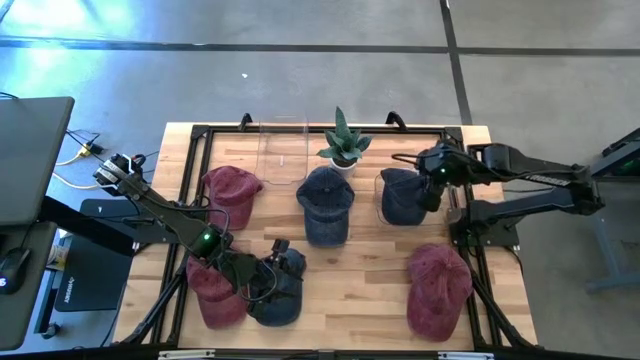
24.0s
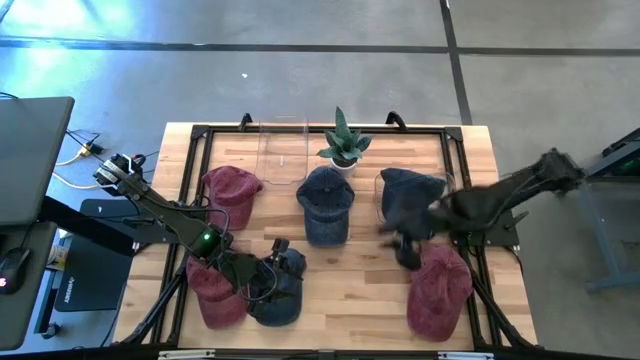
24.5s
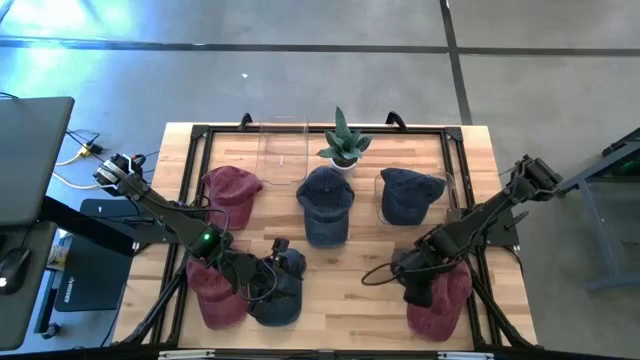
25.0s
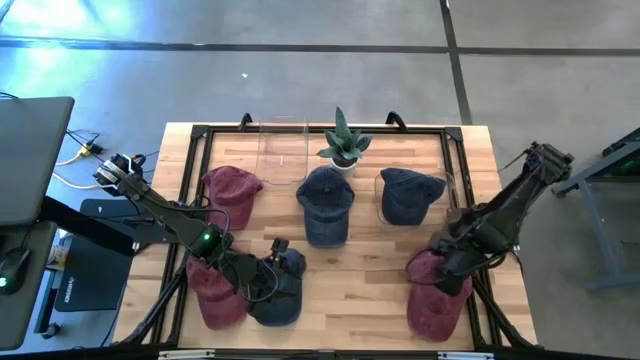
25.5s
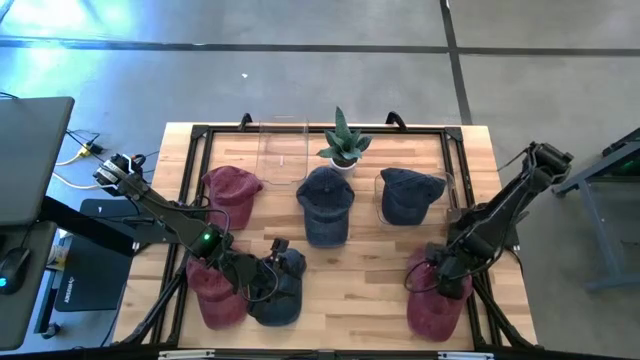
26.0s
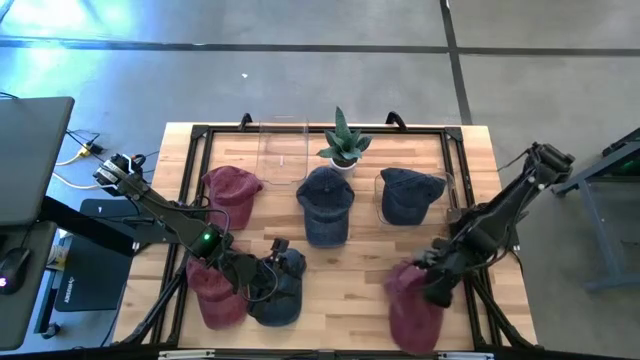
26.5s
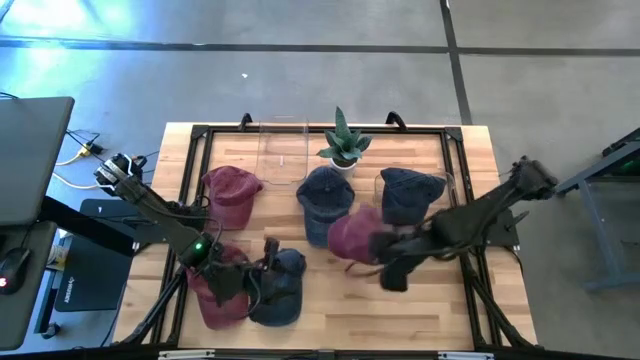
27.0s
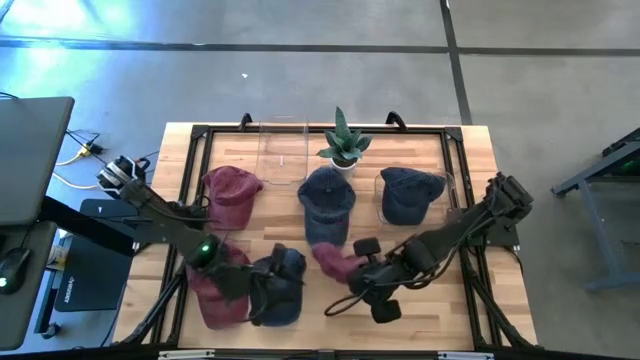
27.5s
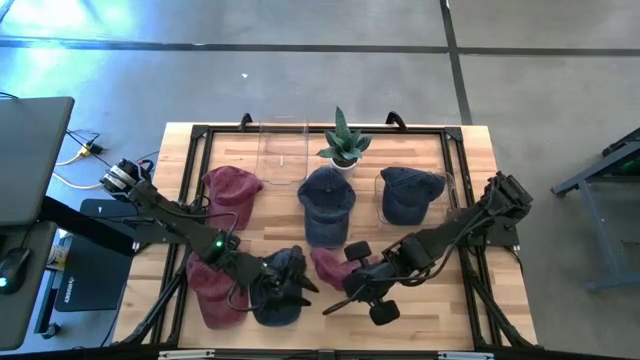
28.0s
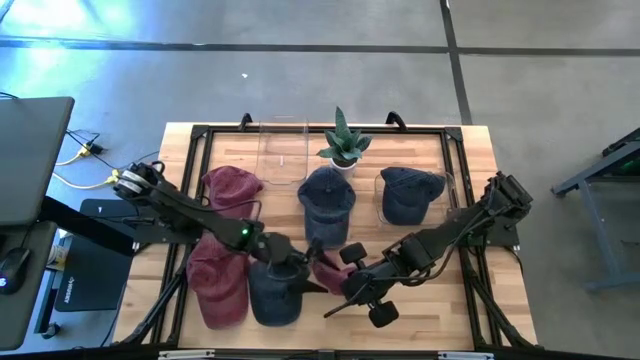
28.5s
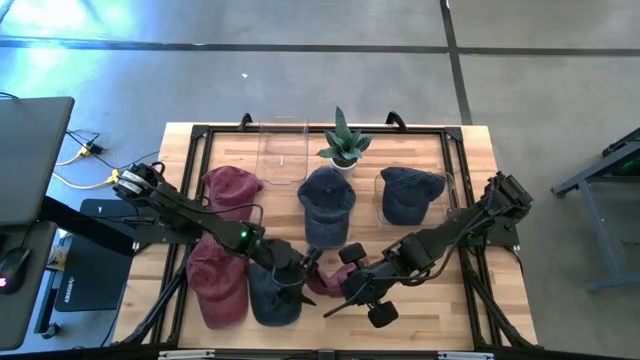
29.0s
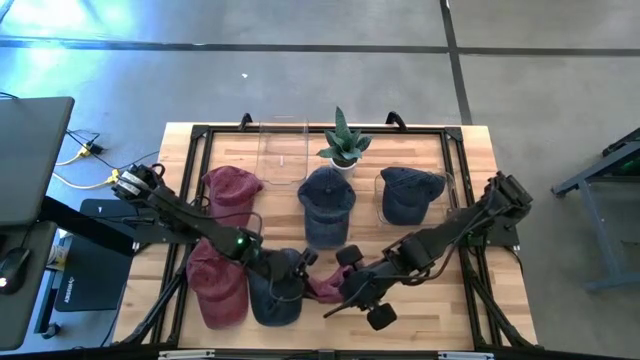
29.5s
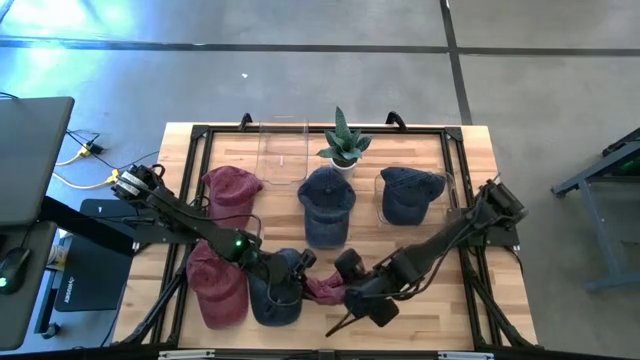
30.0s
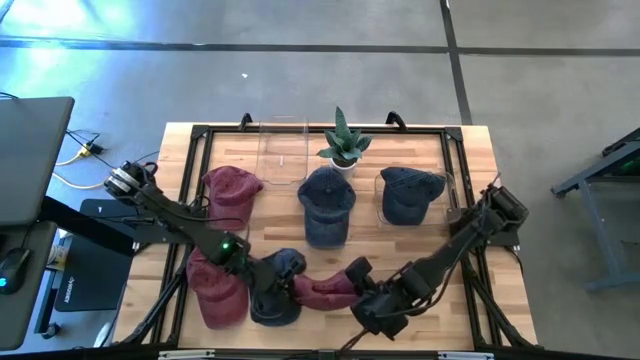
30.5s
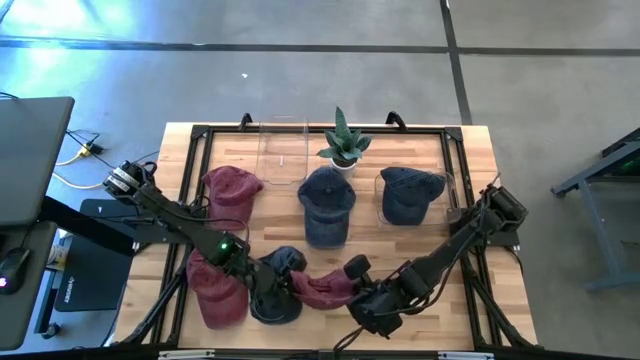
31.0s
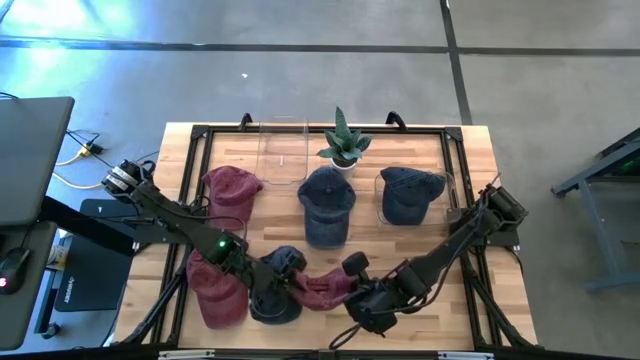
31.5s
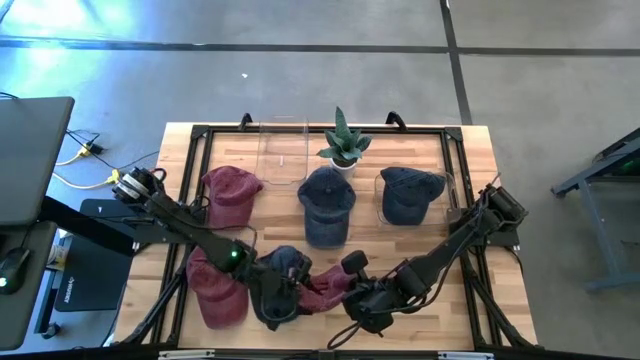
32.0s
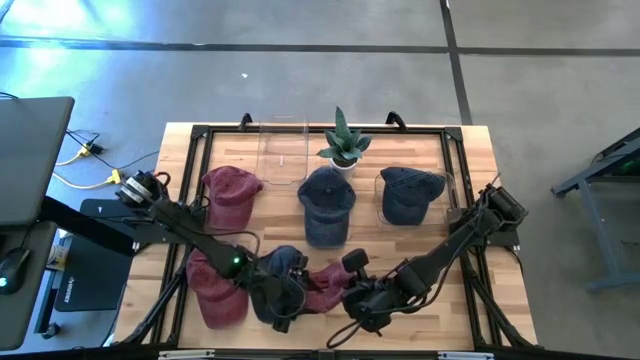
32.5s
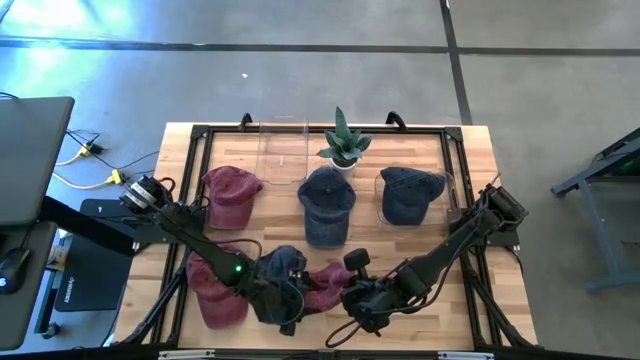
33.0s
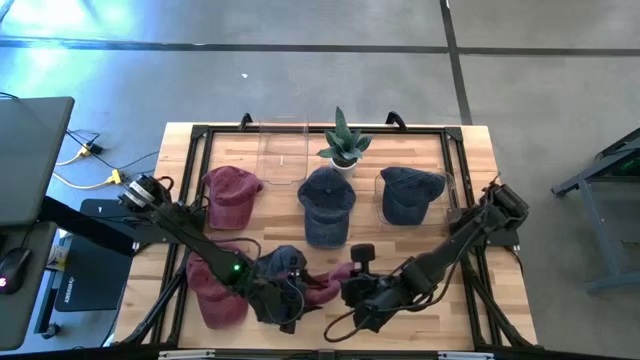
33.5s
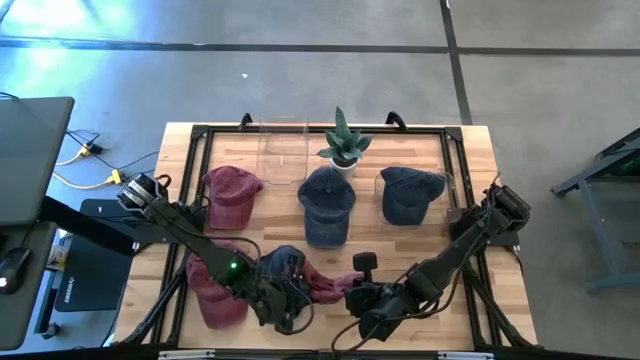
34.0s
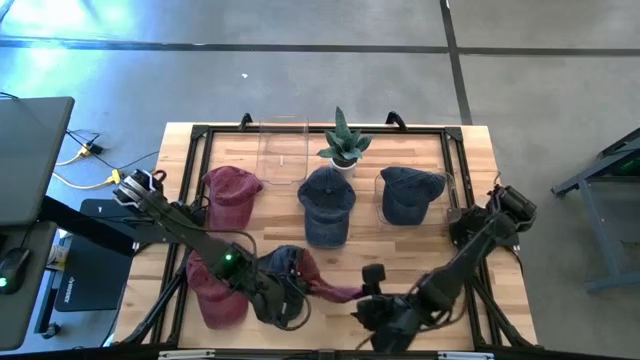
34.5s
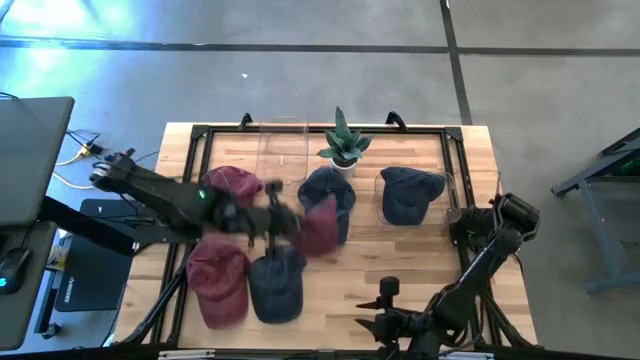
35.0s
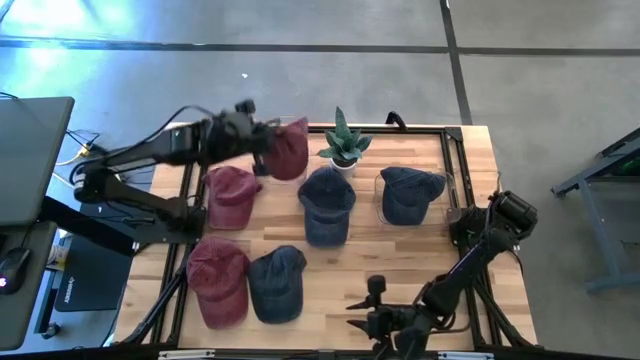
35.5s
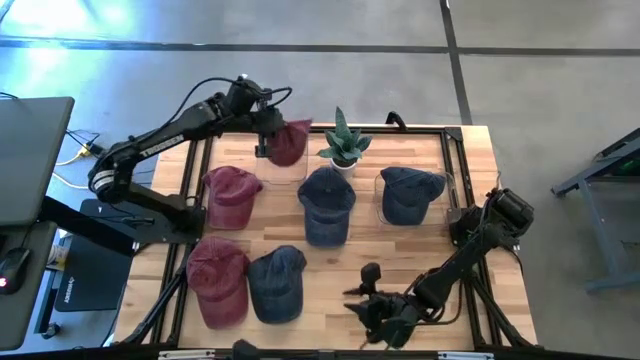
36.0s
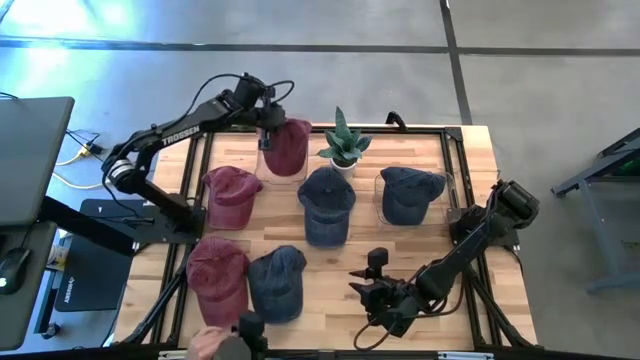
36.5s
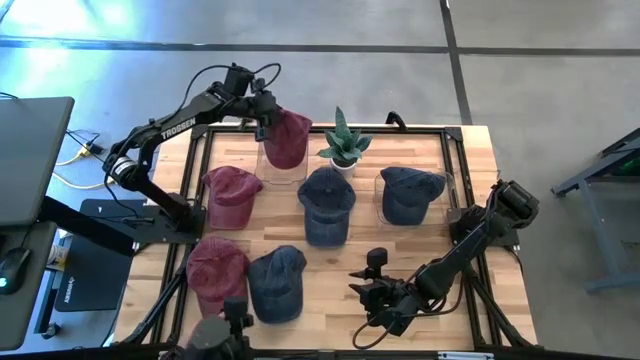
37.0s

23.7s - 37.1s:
Task: Pick & Place hat
Put the right red cap into the left transparent bin
